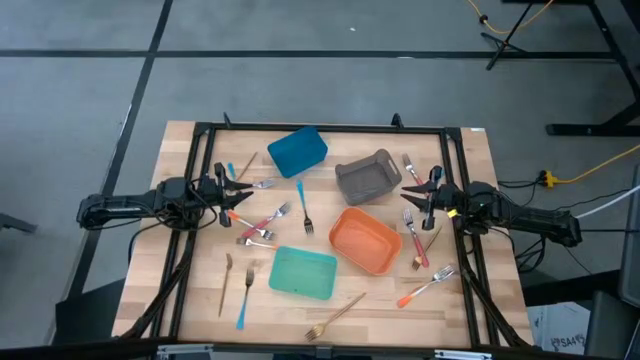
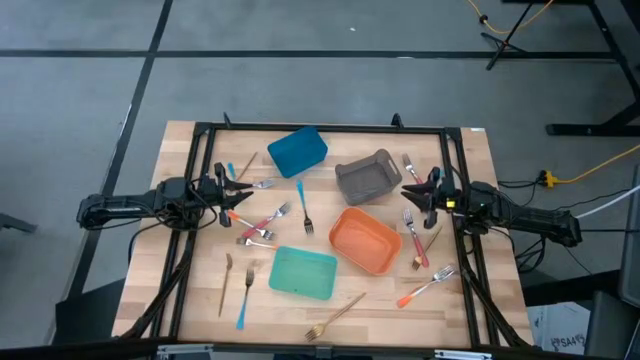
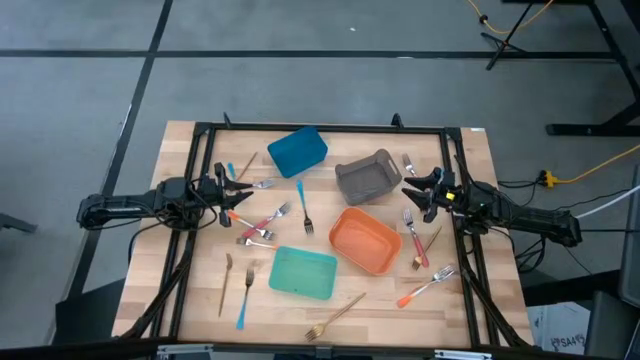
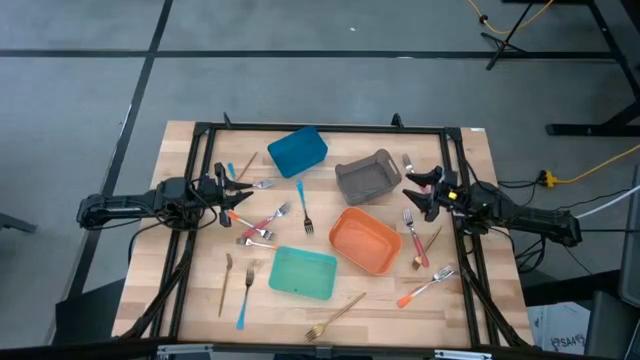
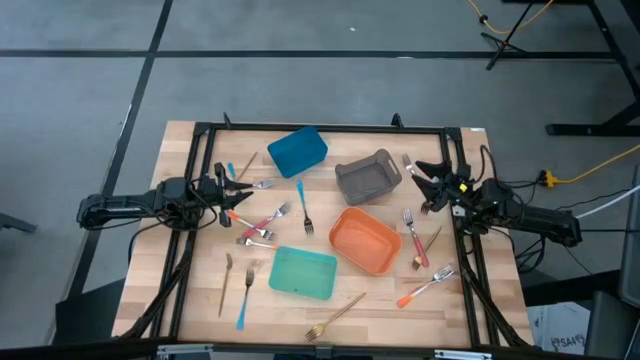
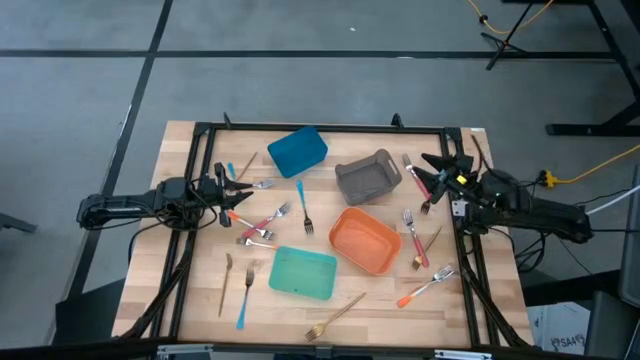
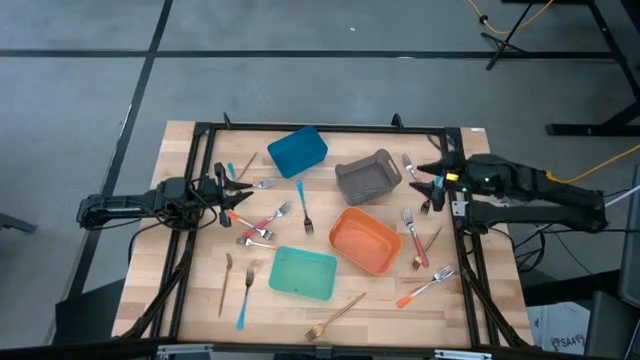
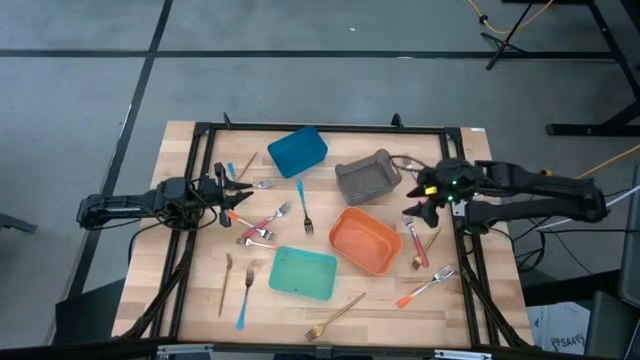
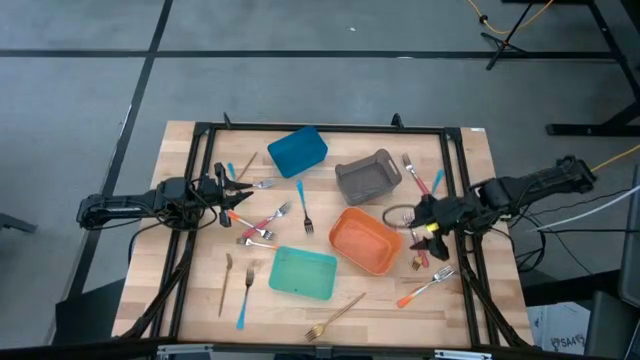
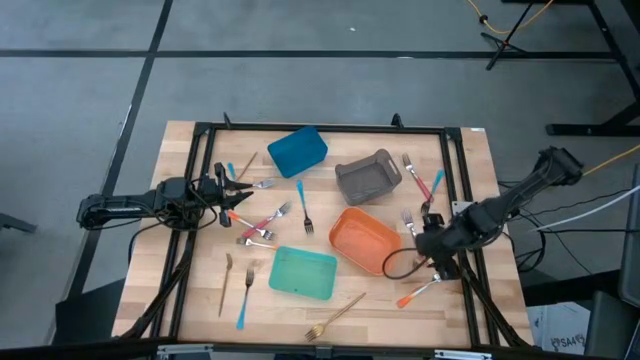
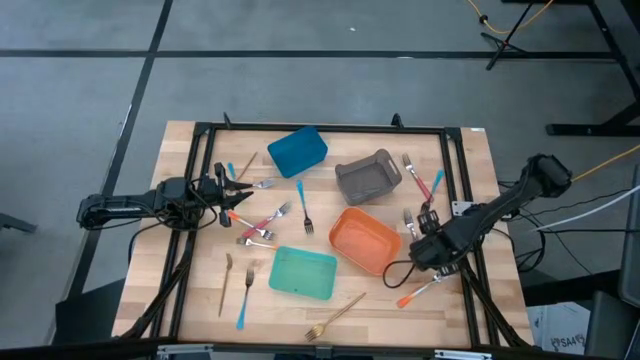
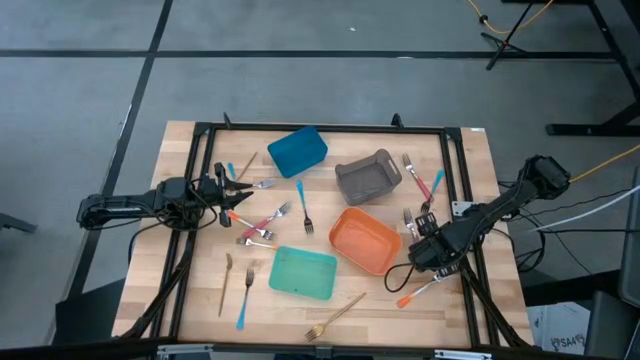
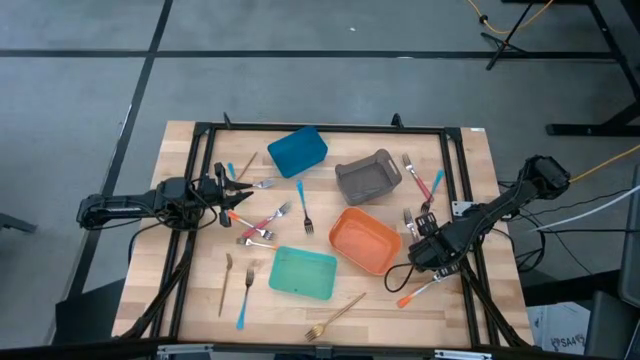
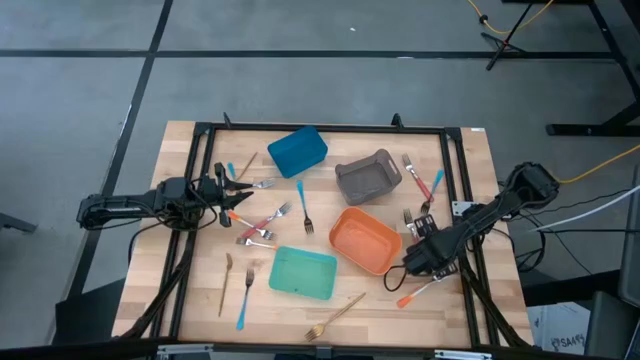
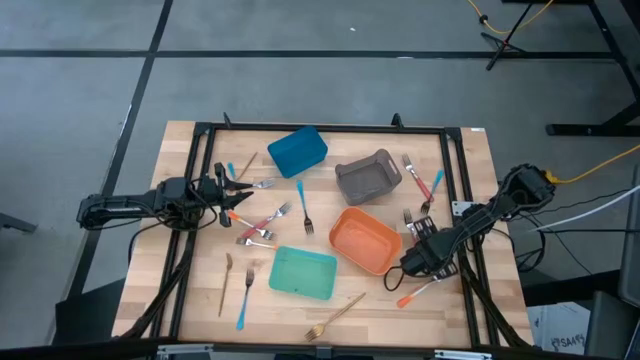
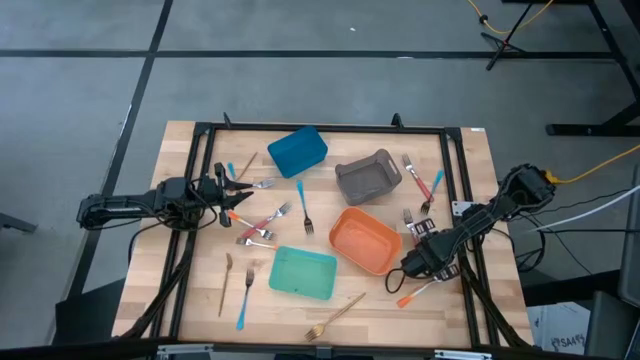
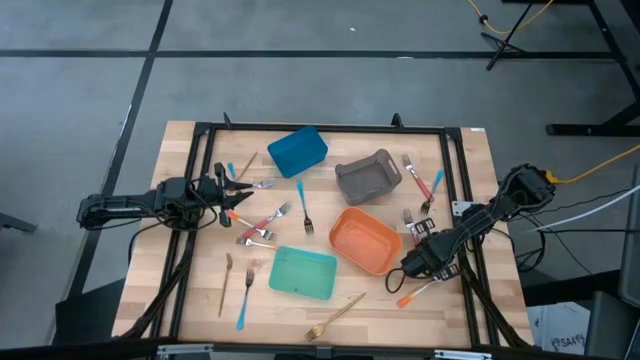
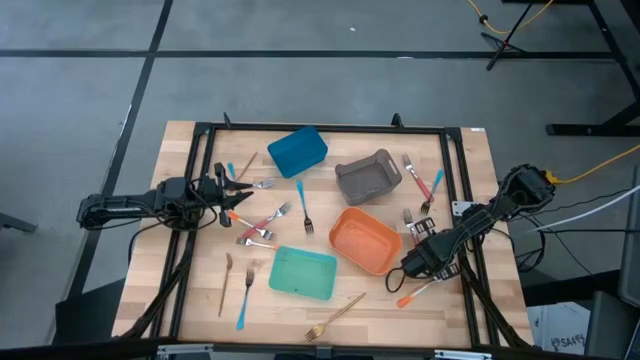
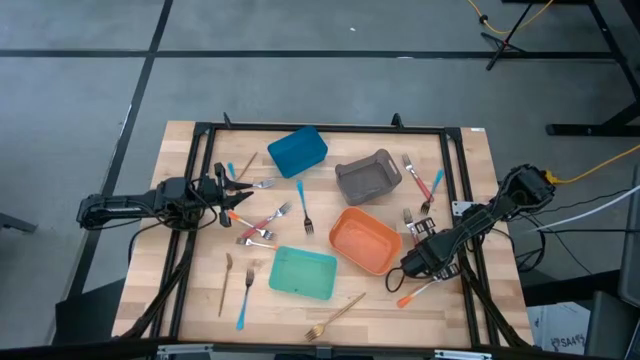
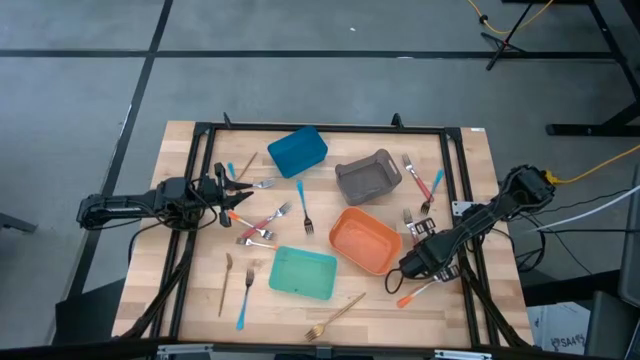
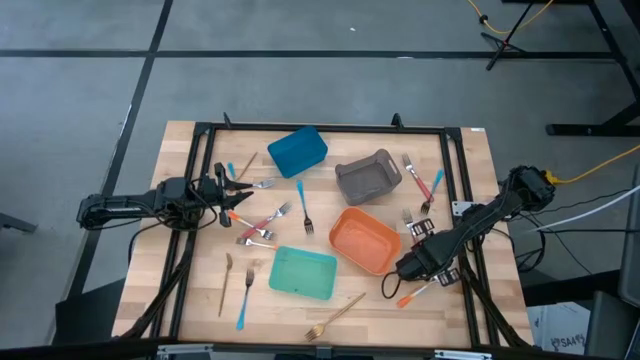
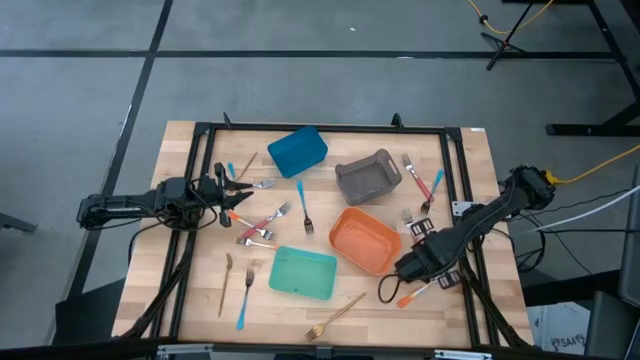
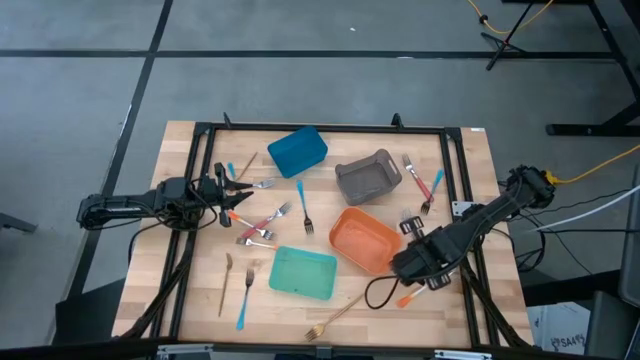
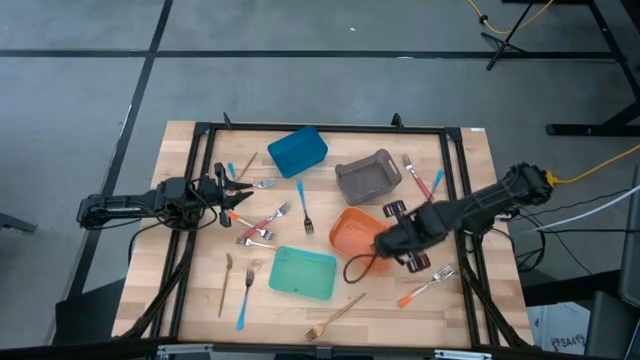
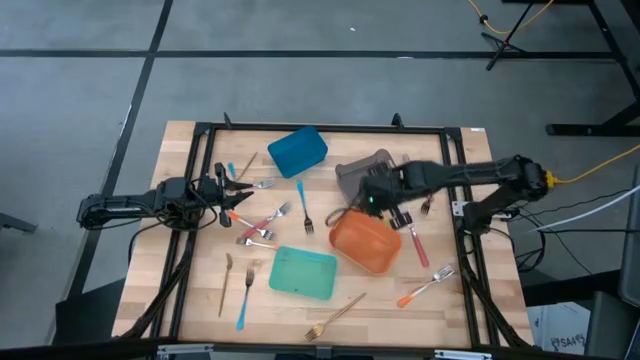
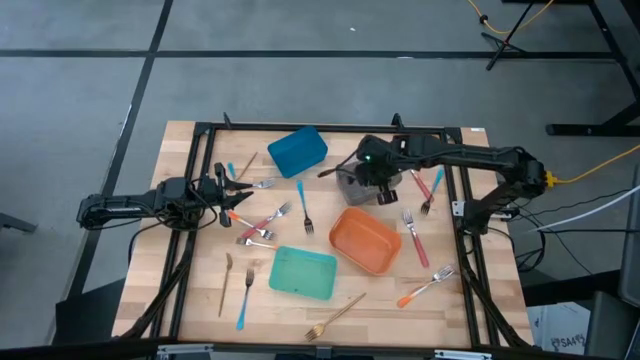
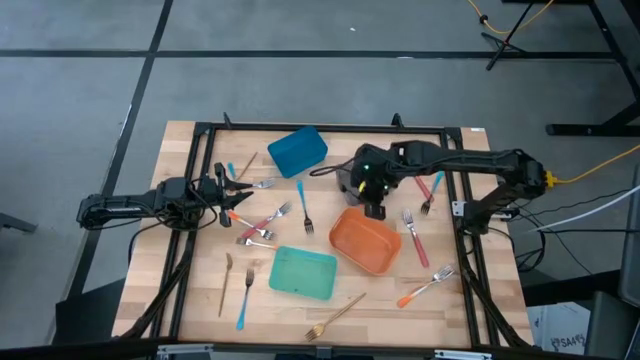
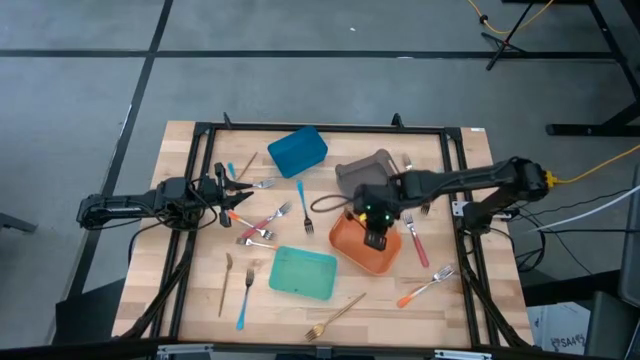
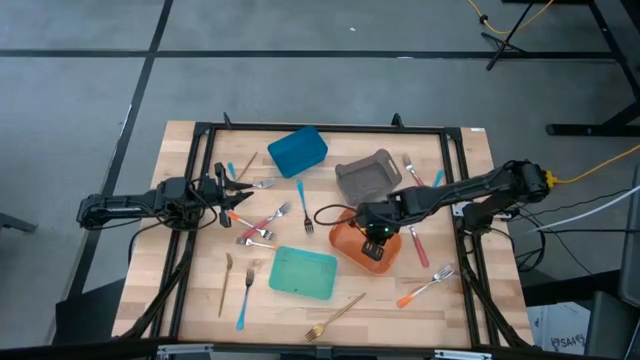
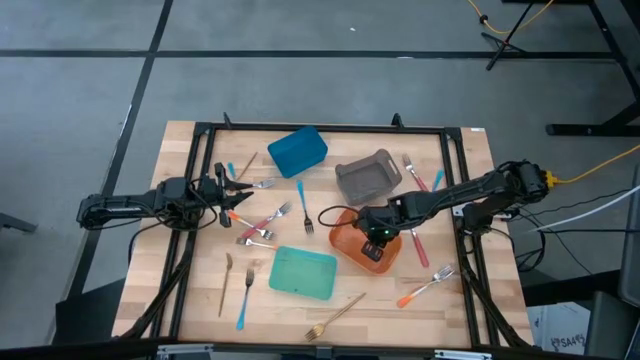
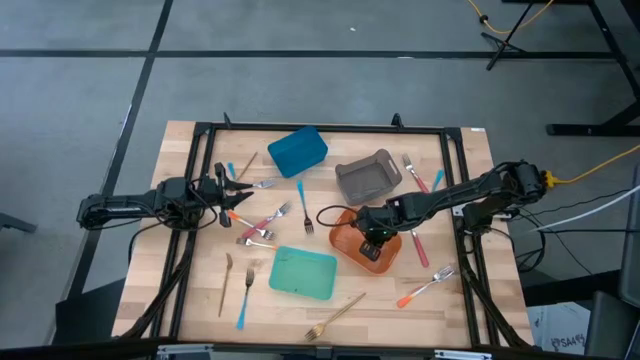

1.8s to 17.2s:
Task: Sort silverware by color (type)
Put the gold fork into the orange bin

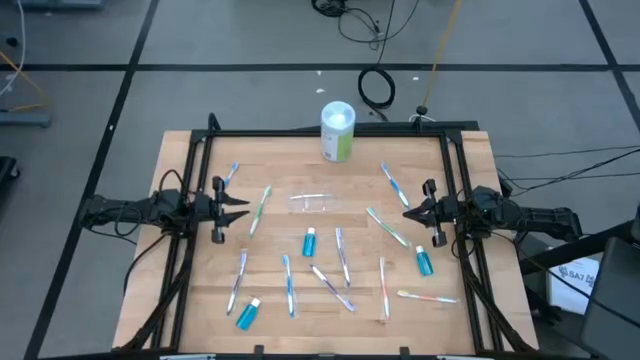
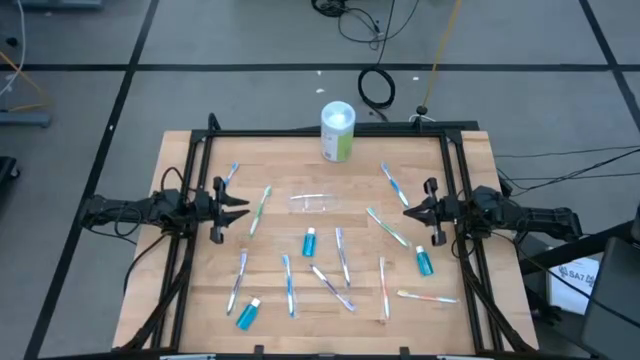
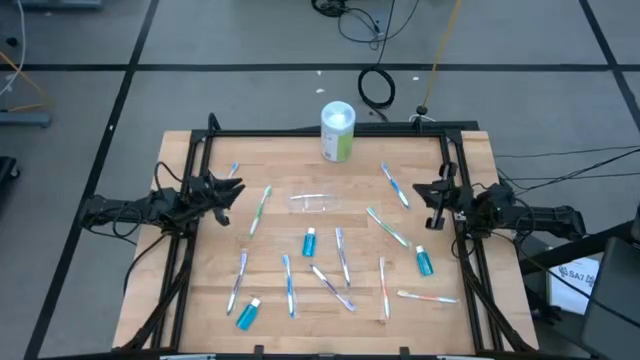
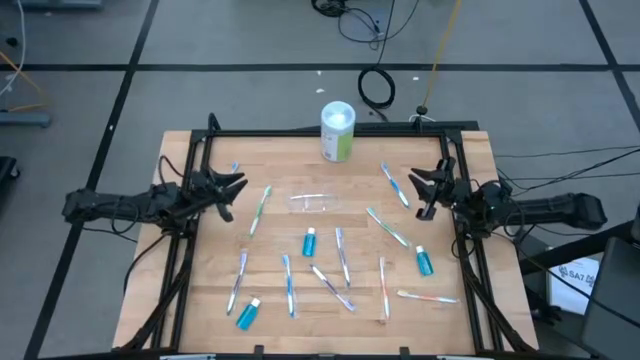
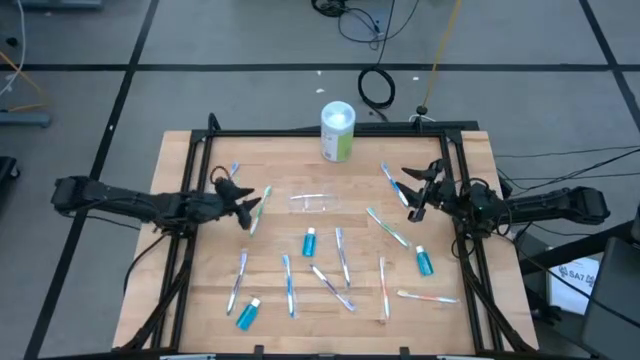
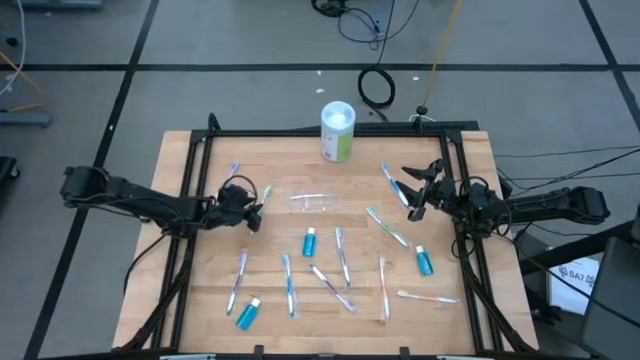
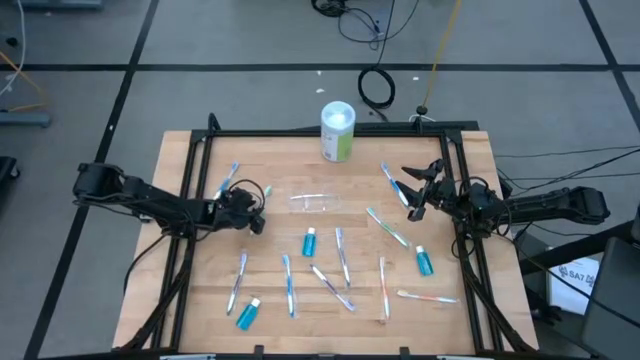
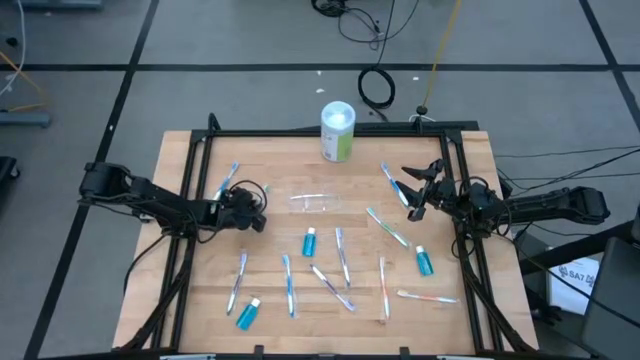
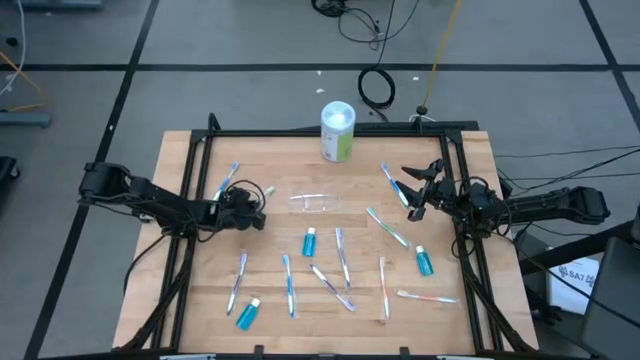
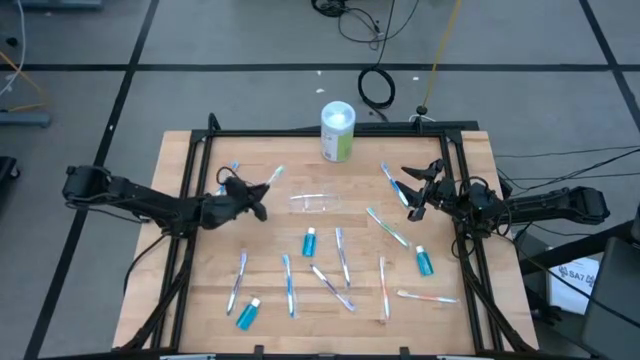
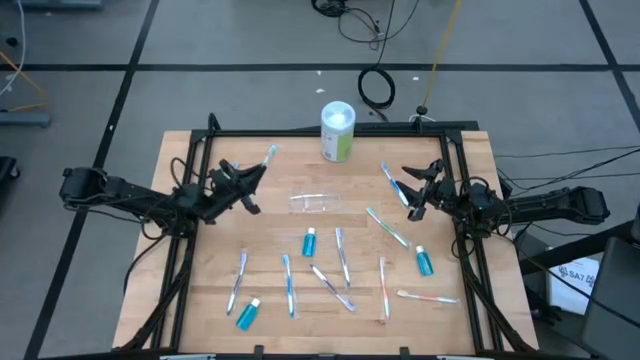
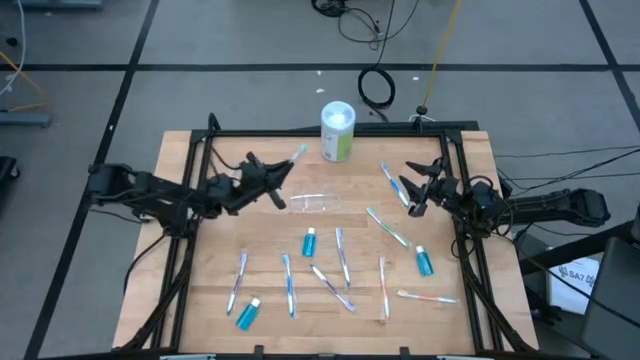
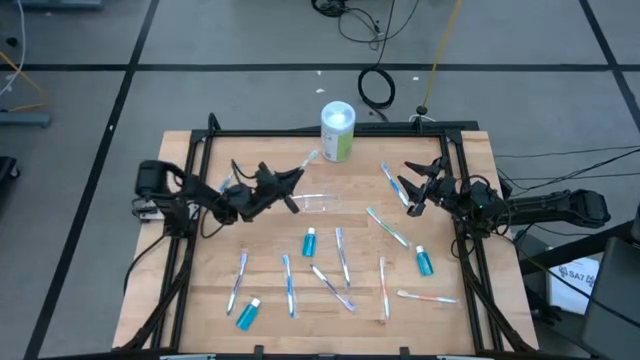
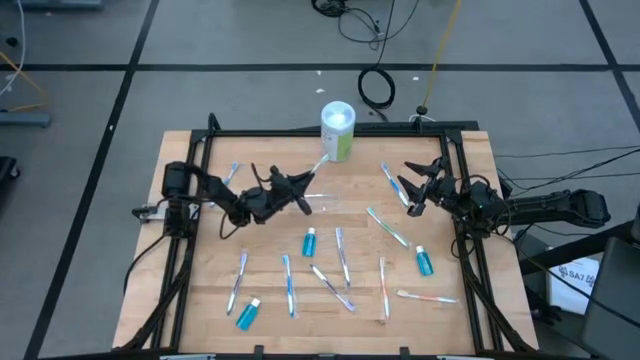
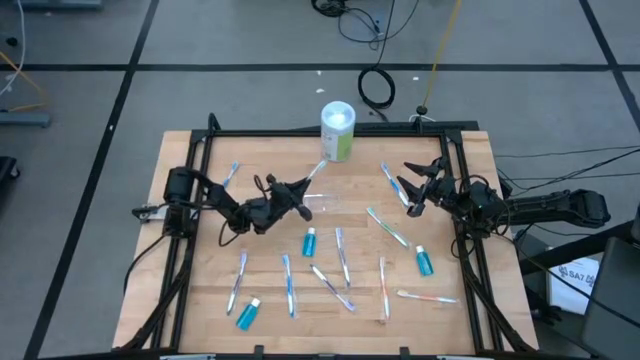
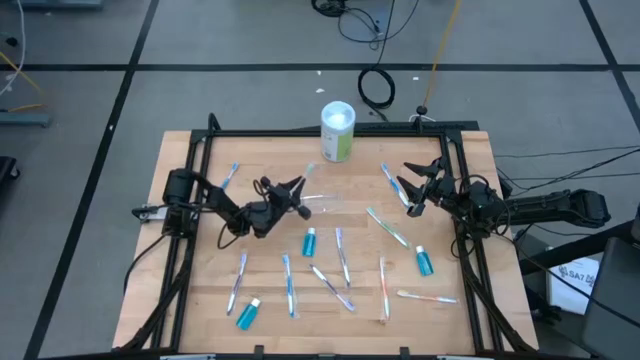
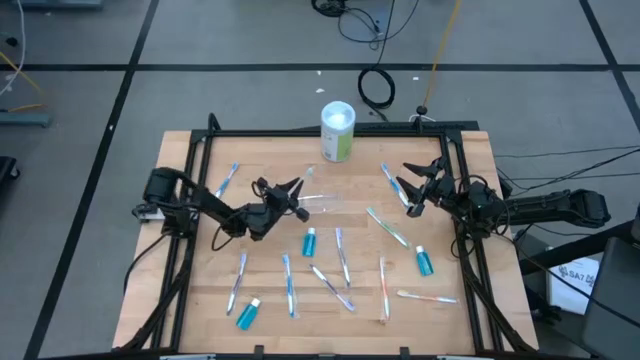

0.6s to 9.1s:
Task: Pick & Place toothbrushing station
Put the left green toothbrush into the transparent organizer
